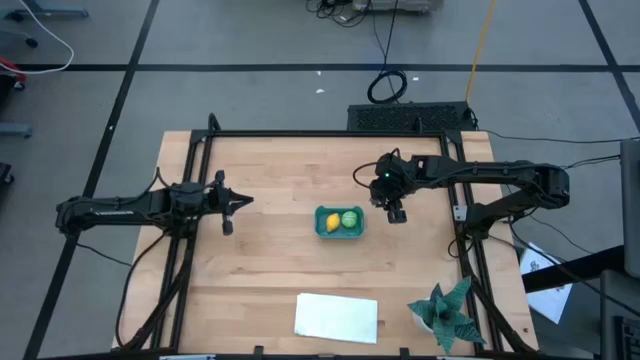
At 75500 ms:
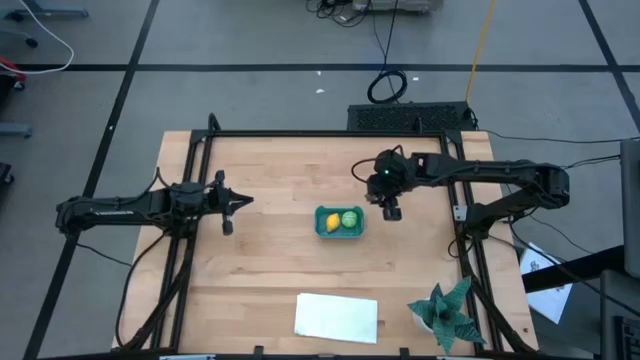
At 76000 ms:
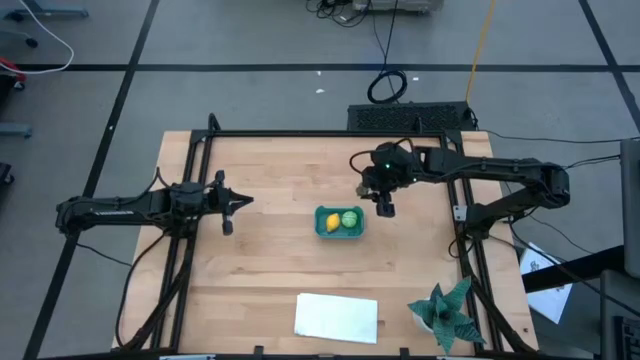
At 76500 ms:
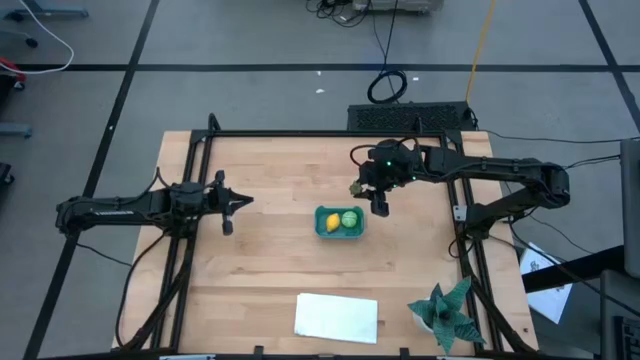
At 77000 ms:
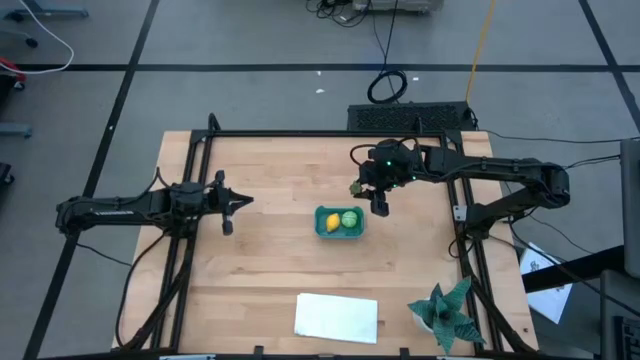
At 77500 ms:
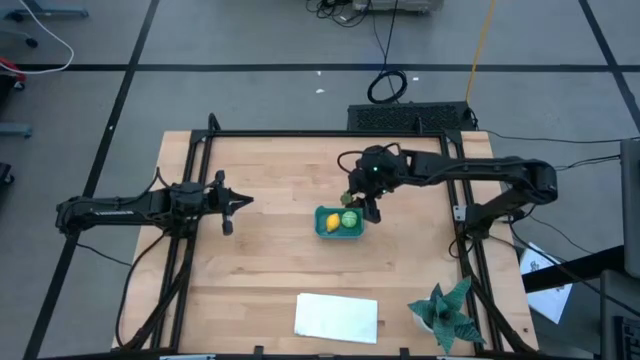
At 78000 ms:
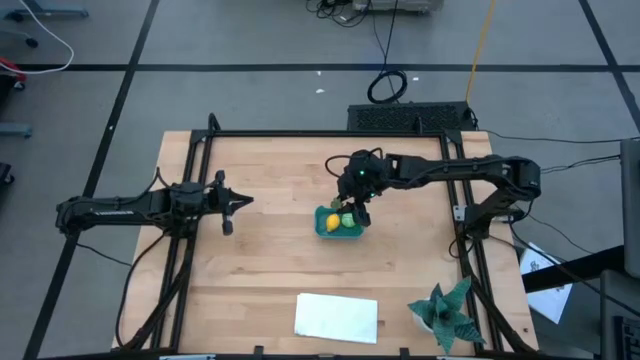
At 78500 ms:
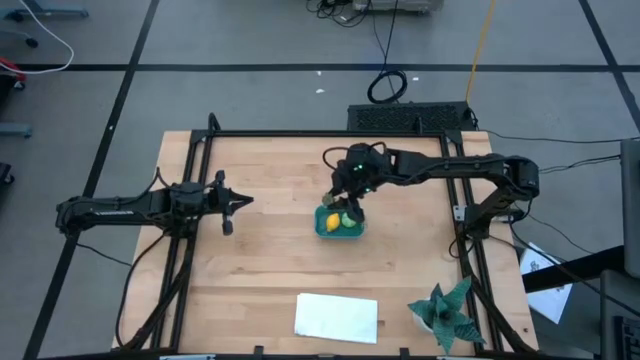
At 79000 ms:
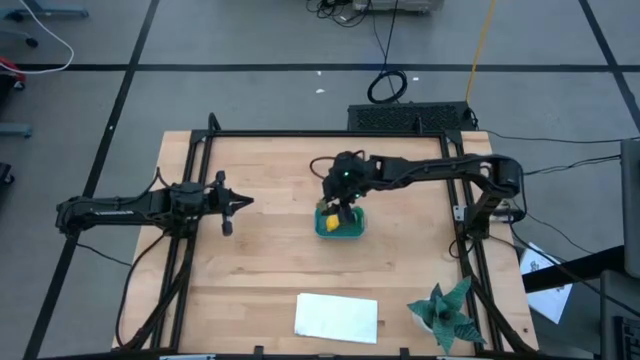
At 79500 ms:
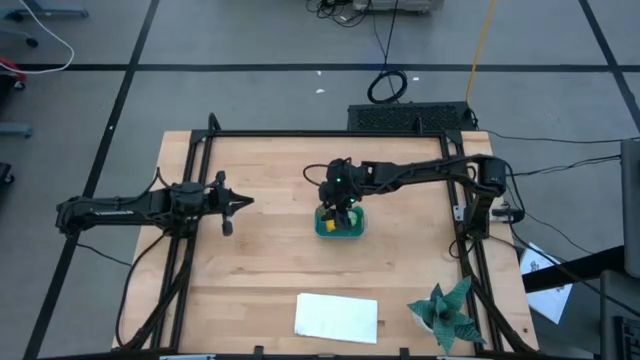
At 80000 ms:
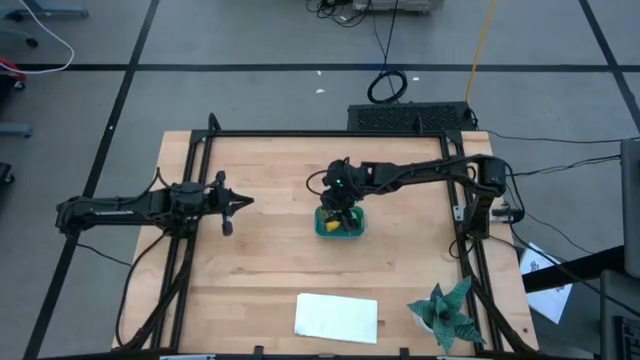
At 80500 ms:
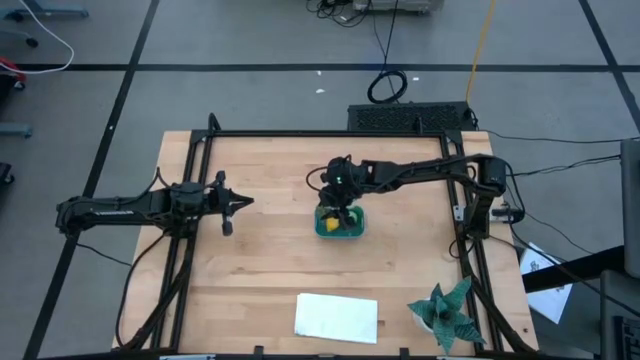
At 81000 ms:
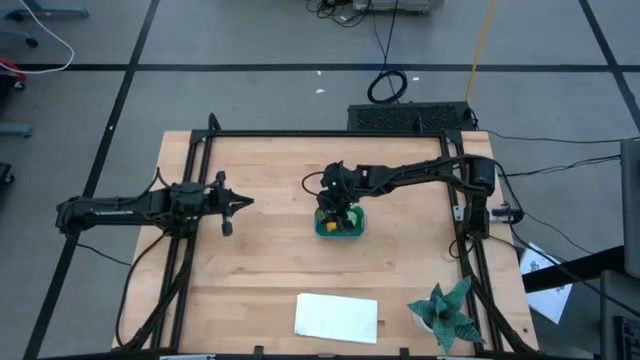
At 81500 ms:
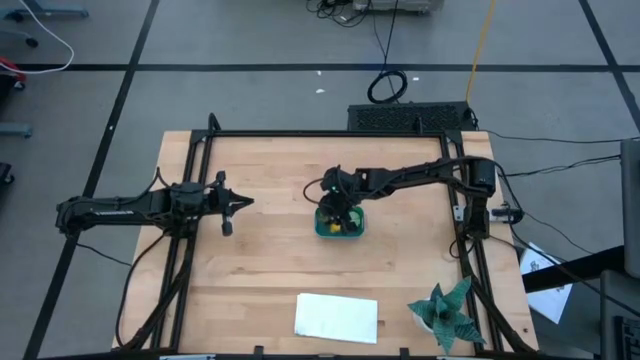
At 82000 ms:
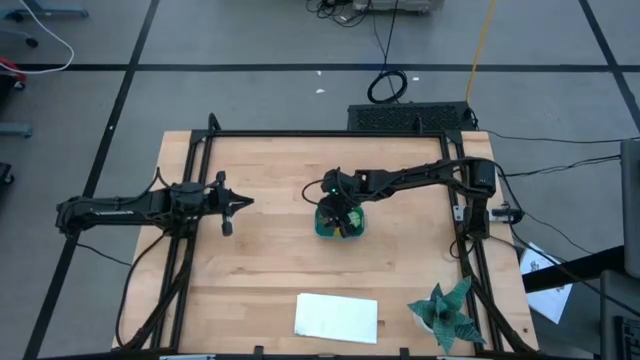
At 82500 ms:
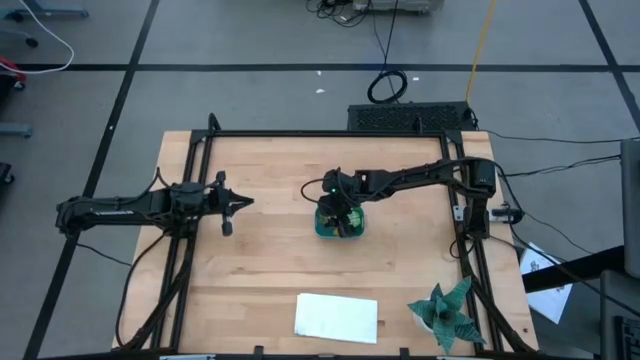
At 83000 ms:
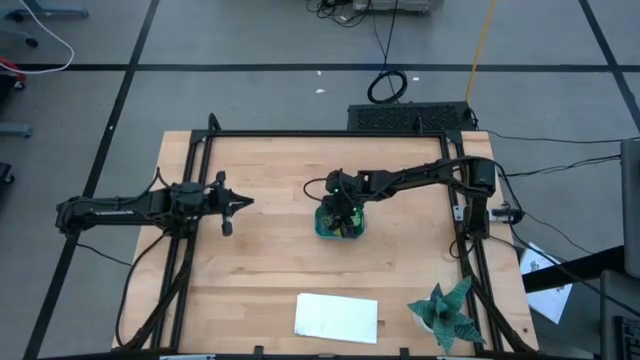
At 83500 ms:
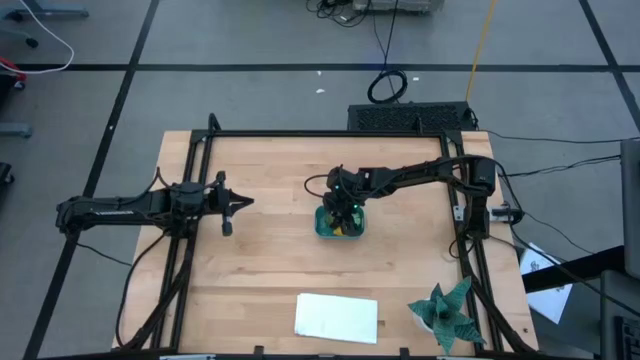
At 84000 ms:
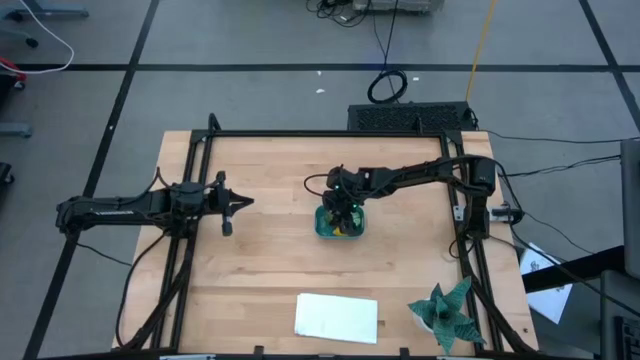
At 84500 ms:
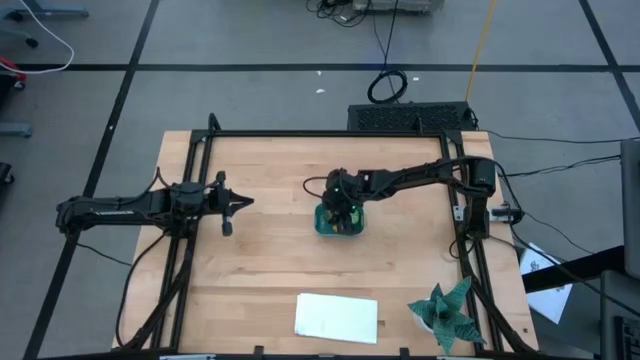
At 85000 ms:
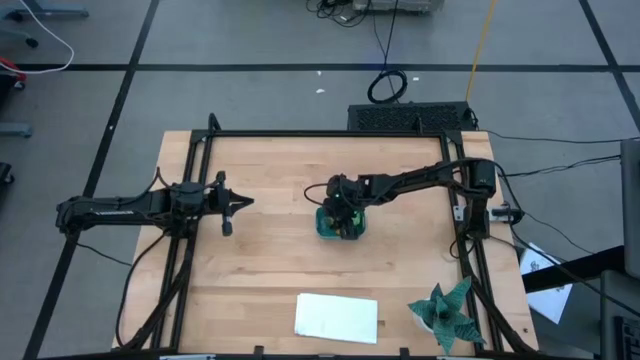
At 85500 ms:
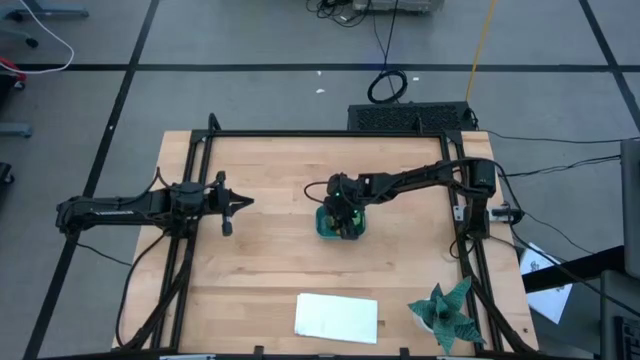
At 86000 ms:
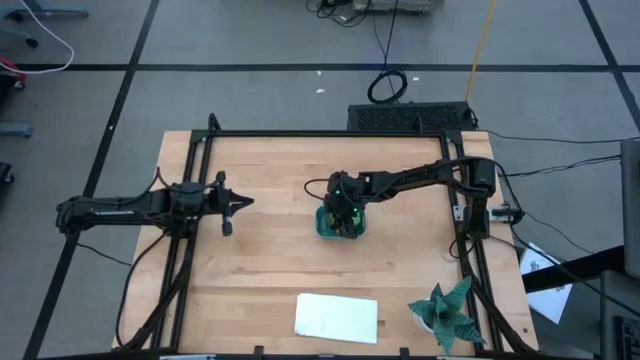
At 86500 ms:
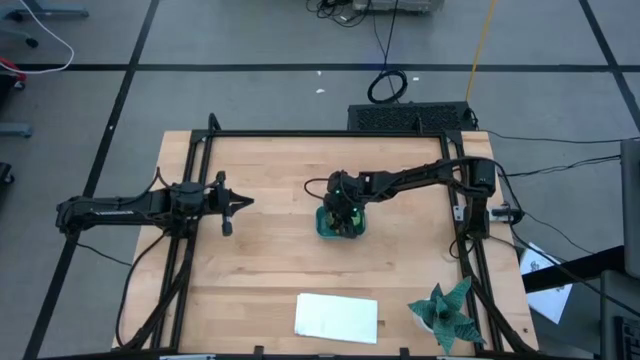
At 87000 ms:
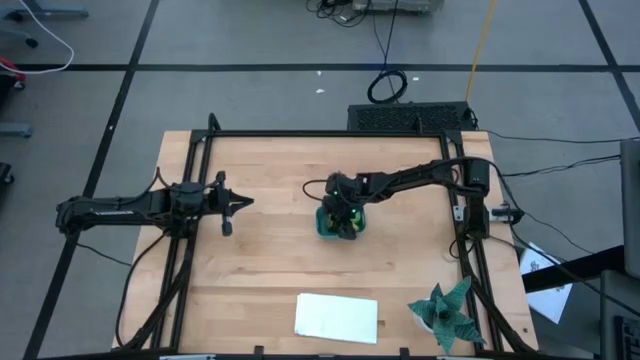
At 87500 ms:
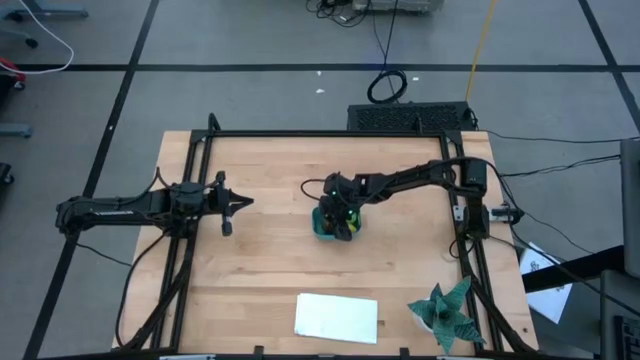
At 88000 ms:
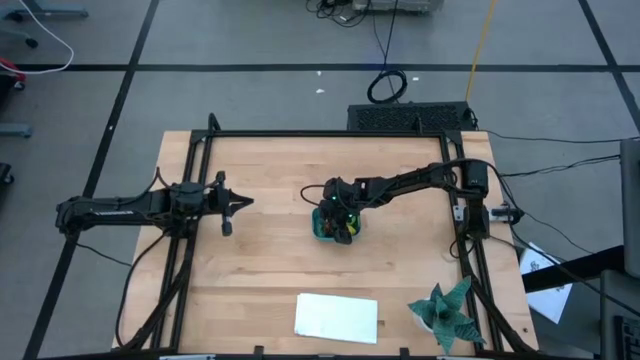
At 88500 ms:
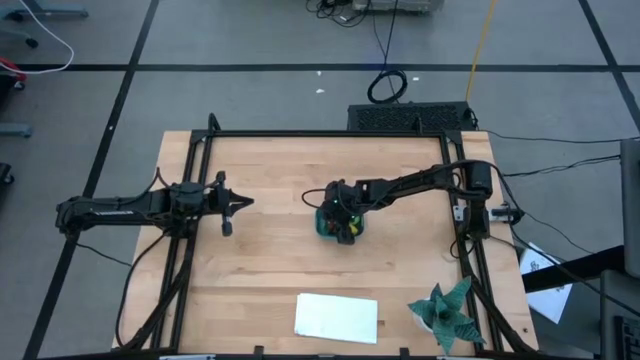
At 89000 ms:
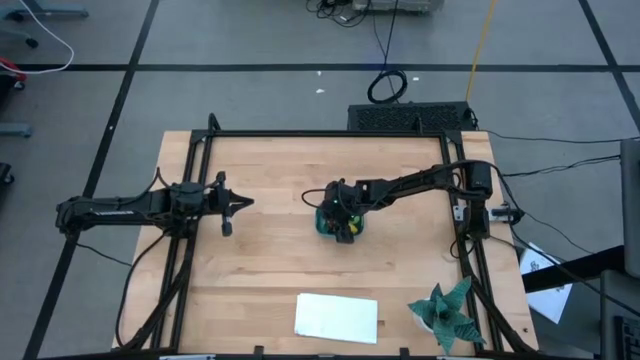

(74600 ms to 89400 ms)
Task: Pick and placing Produce into tupperware
Put the red strawberry in the bin

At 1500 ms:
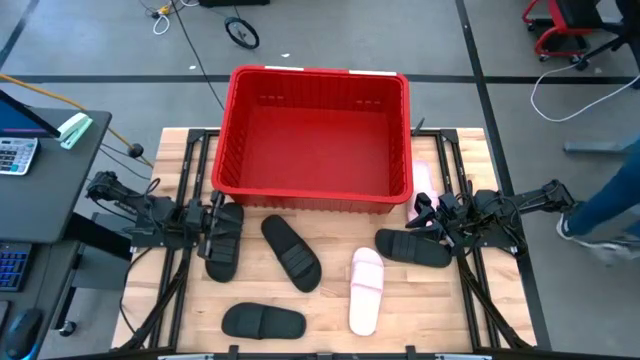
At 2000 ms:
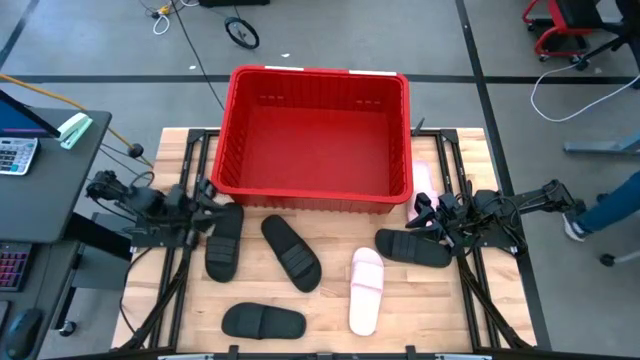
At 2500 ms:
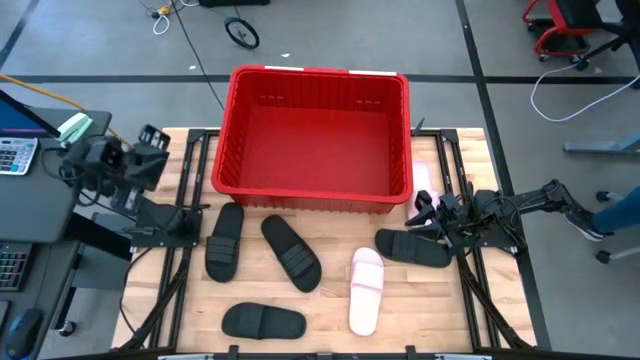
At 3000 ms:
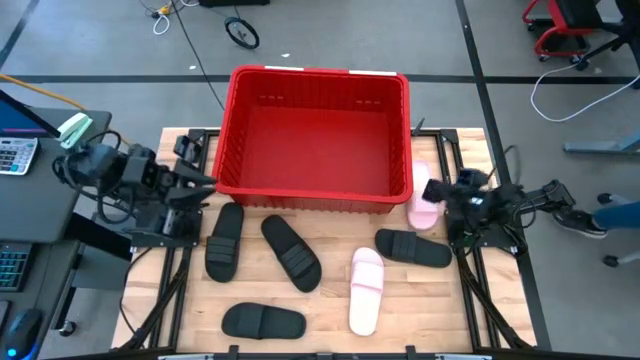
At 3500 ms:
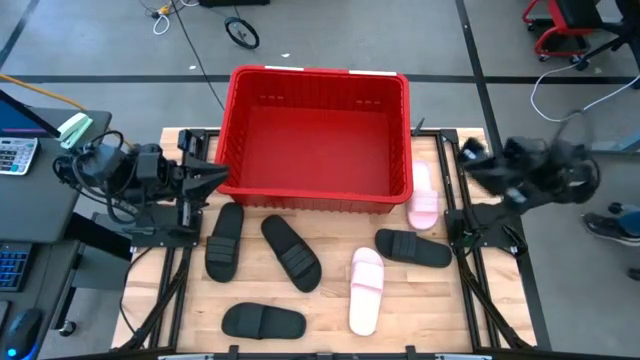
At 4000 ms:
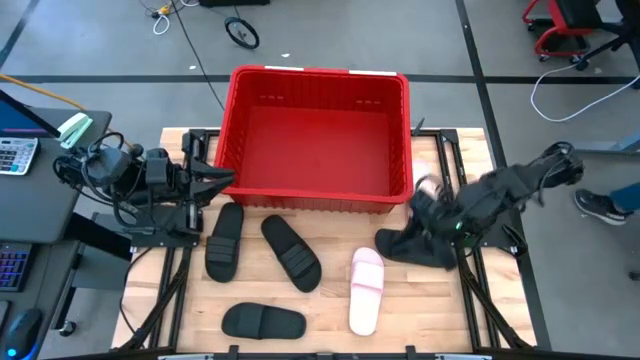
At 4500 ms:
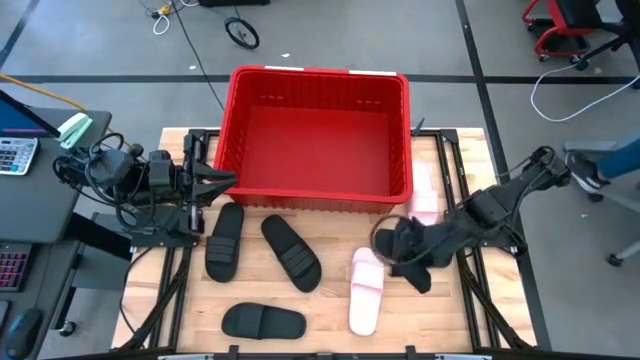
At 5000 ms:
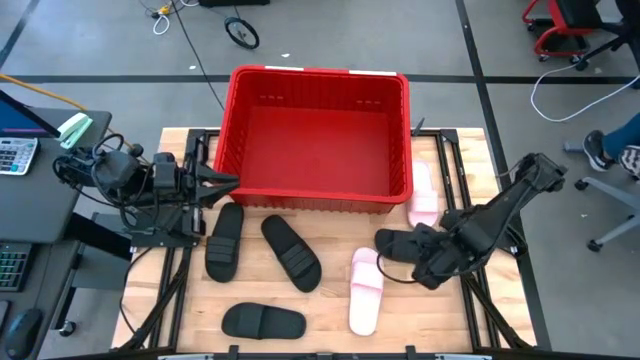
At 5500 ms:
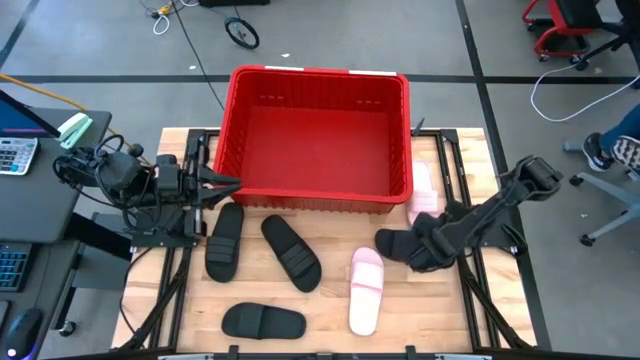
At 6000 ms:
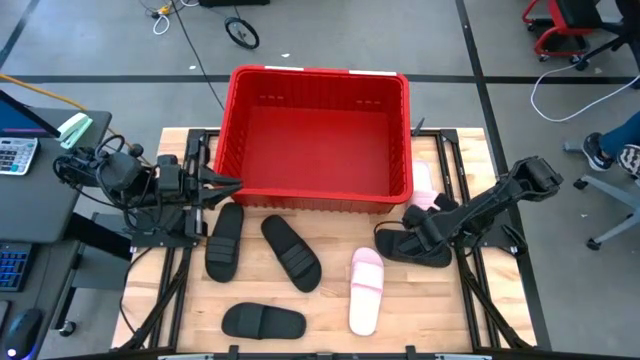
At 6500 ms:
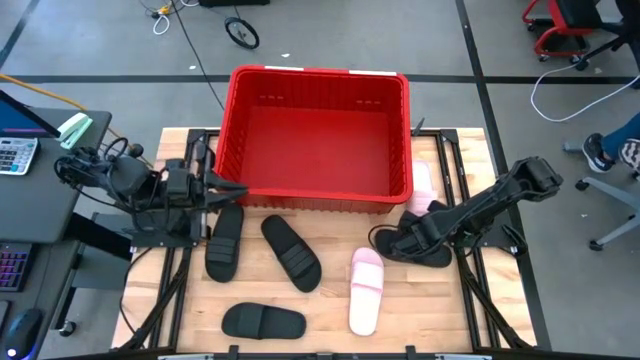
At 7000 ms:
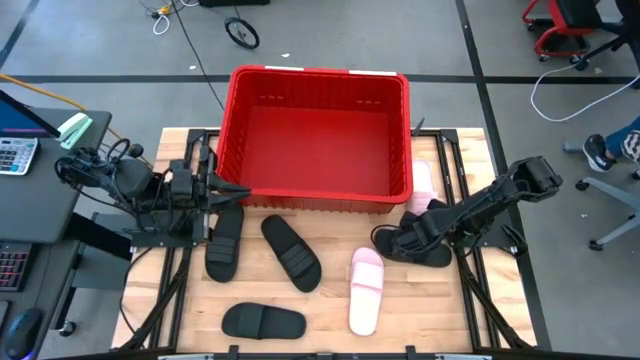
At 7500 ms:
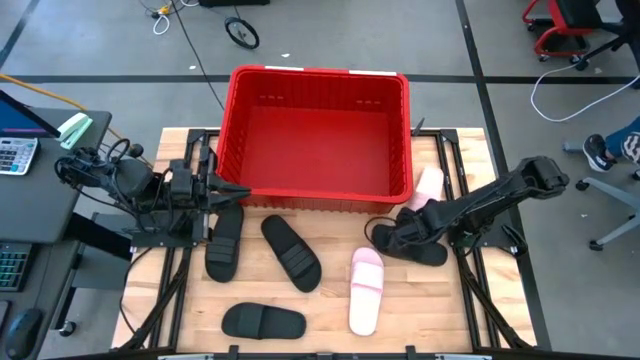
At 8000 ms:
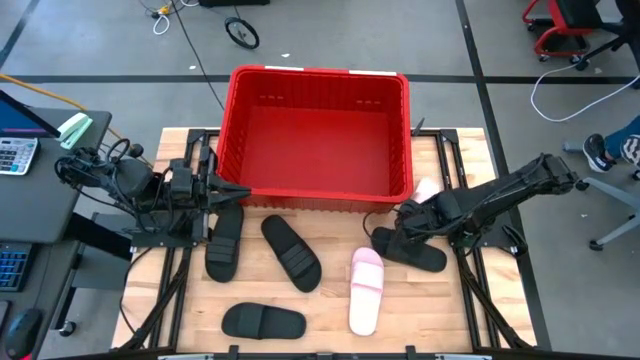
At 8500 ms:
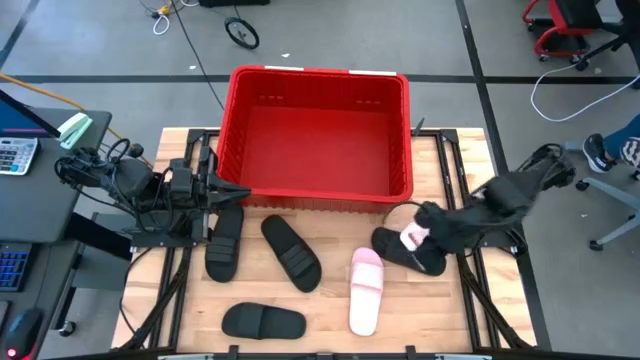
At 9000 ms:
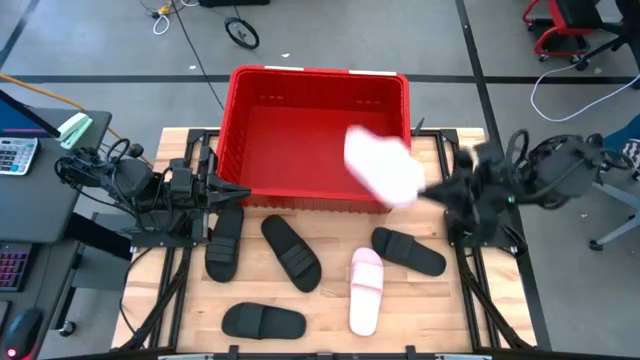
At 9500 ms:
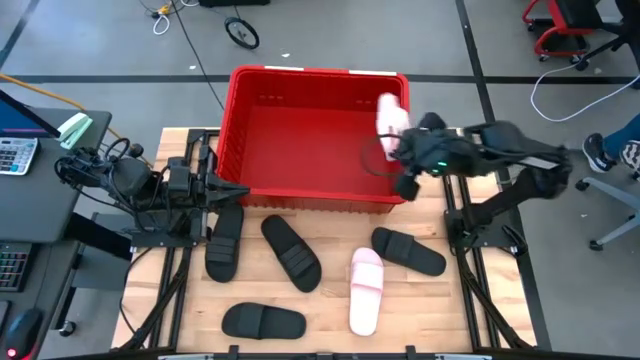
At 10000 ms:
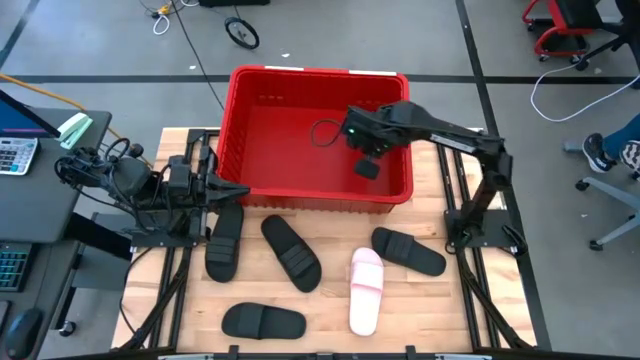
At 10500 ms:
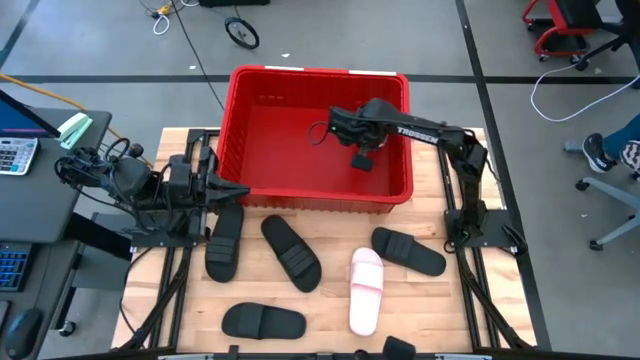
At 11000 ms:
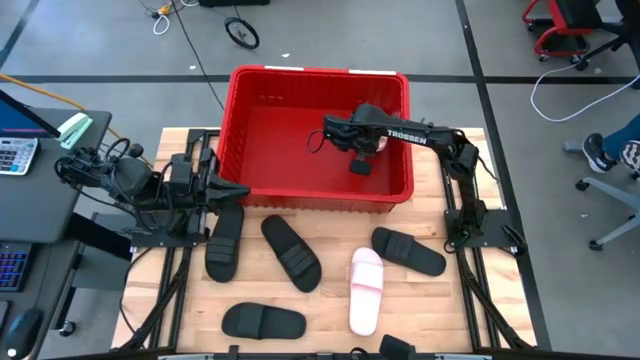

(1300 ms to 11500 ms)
Task: Pick and place slides into bin
Put the pink slide into the red bin
